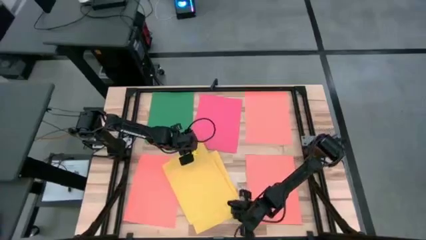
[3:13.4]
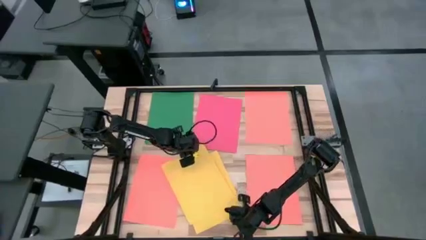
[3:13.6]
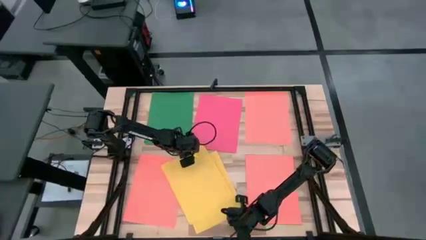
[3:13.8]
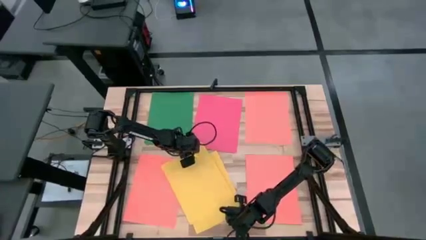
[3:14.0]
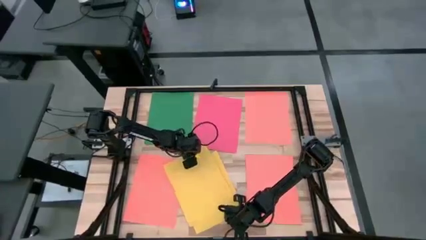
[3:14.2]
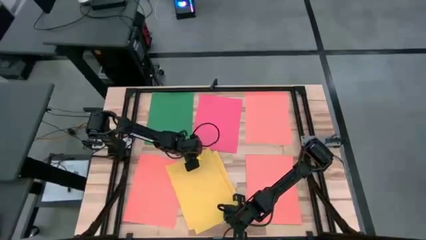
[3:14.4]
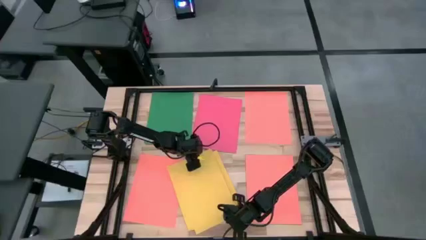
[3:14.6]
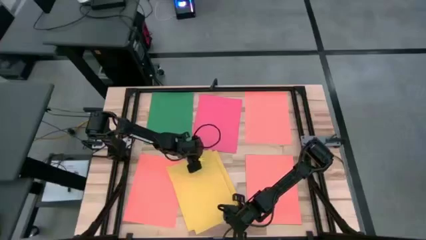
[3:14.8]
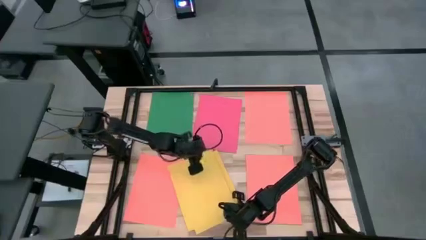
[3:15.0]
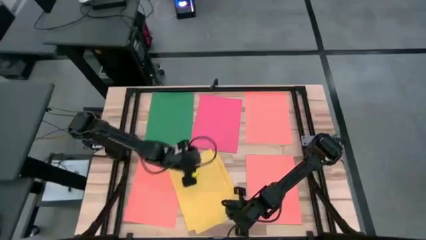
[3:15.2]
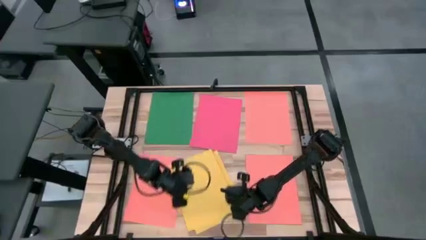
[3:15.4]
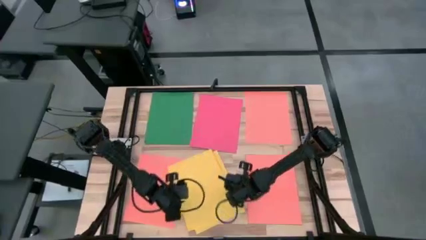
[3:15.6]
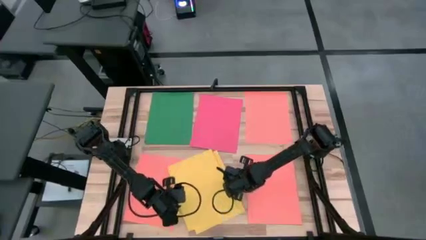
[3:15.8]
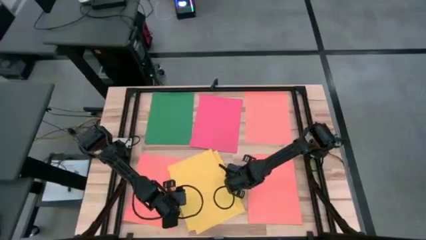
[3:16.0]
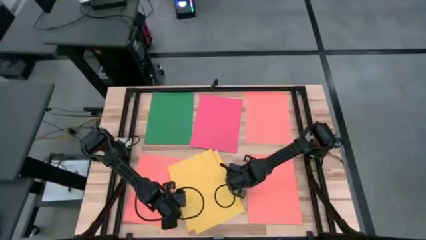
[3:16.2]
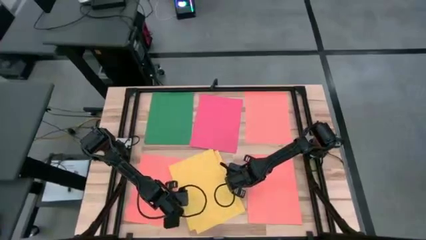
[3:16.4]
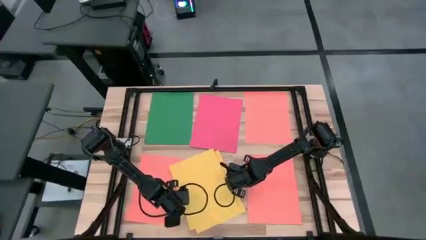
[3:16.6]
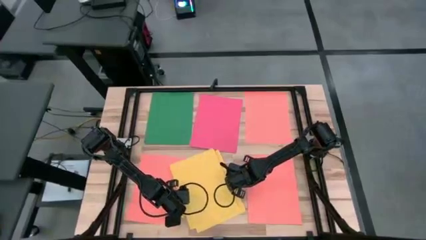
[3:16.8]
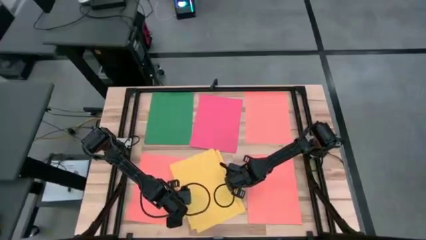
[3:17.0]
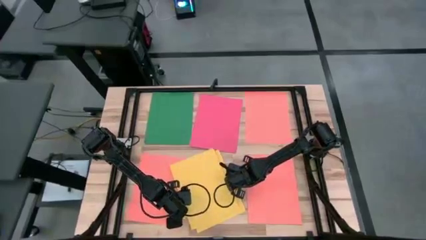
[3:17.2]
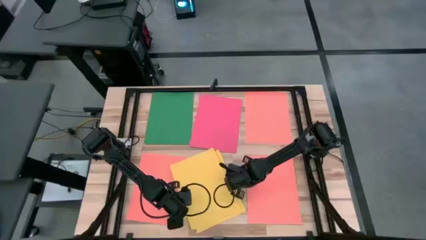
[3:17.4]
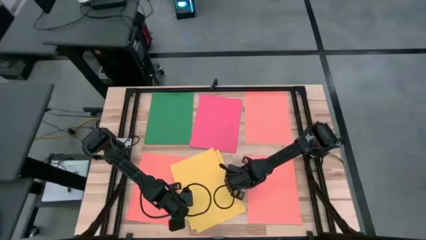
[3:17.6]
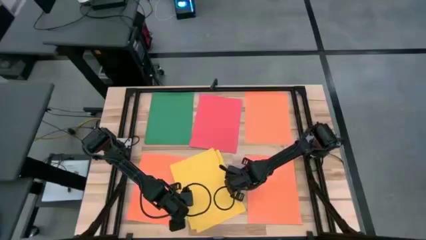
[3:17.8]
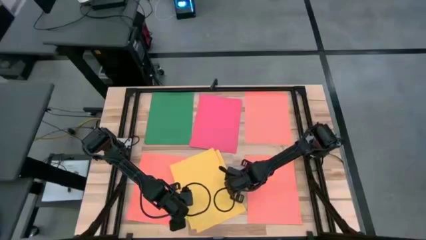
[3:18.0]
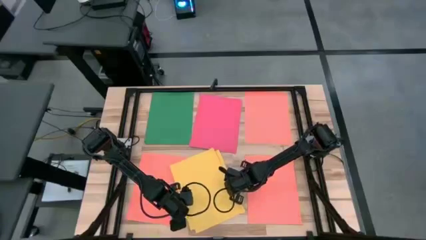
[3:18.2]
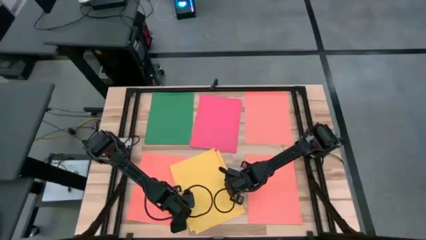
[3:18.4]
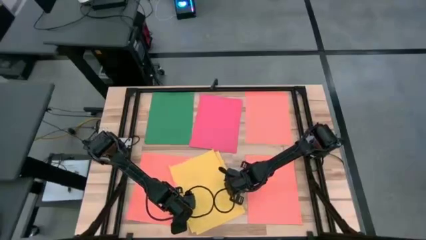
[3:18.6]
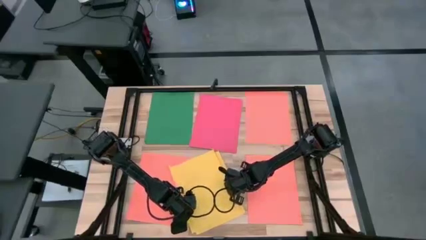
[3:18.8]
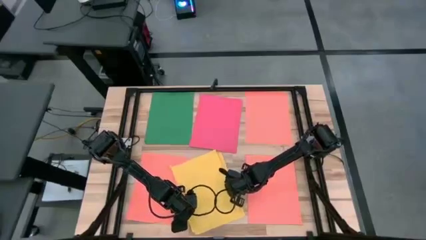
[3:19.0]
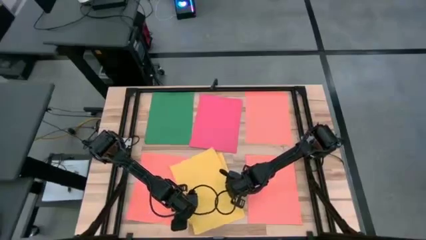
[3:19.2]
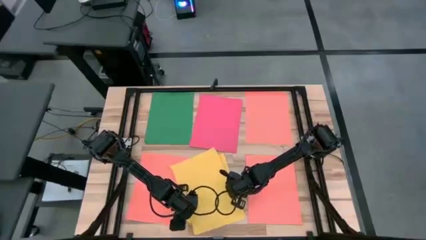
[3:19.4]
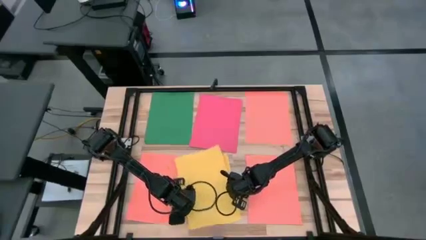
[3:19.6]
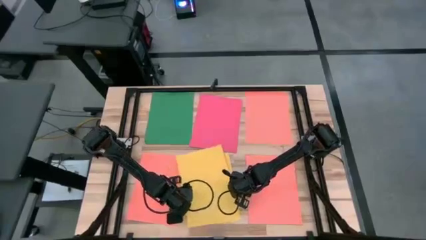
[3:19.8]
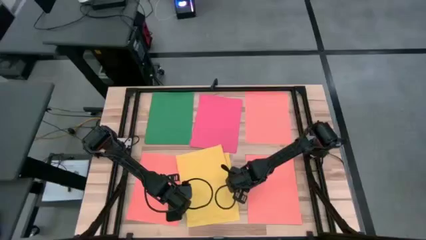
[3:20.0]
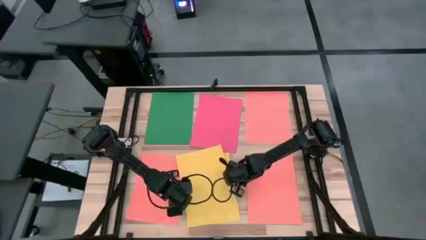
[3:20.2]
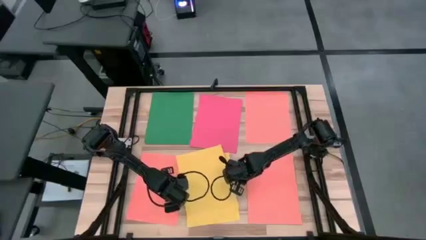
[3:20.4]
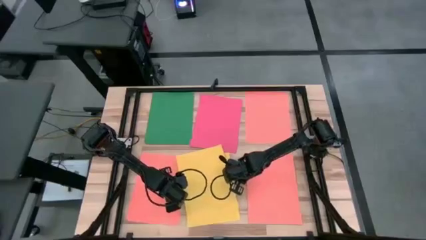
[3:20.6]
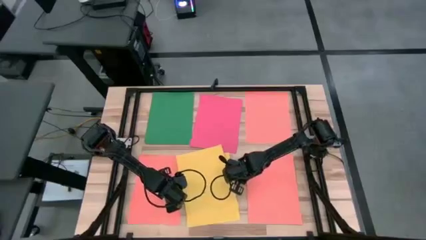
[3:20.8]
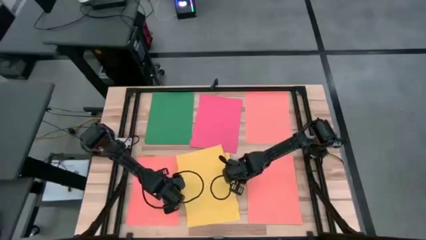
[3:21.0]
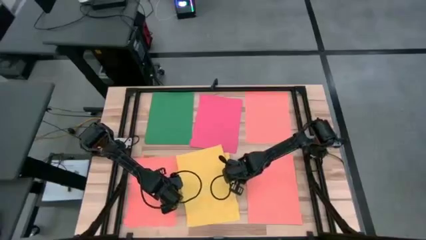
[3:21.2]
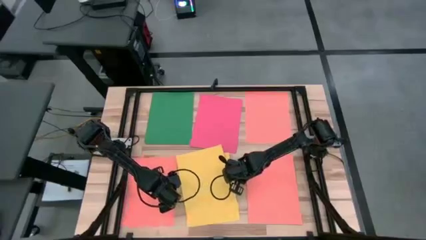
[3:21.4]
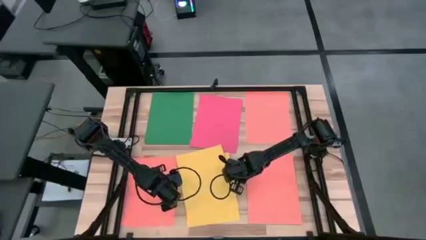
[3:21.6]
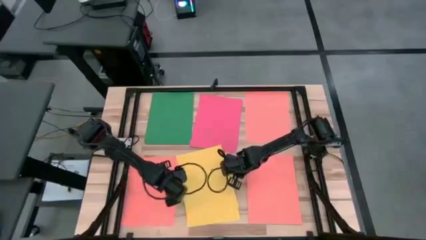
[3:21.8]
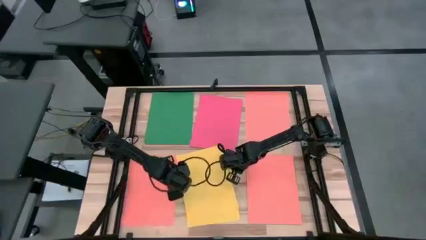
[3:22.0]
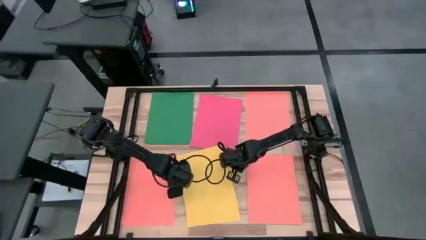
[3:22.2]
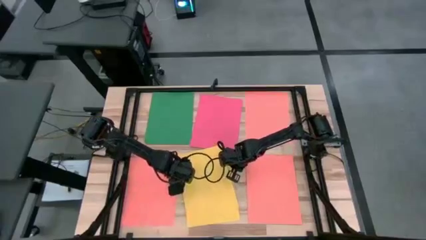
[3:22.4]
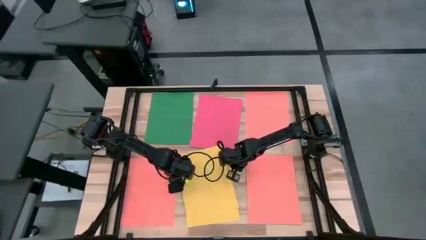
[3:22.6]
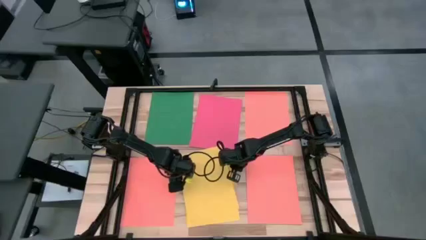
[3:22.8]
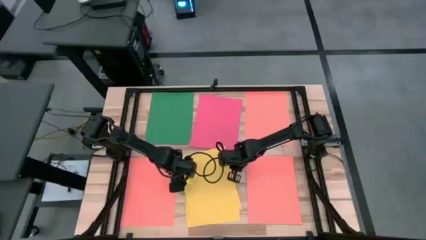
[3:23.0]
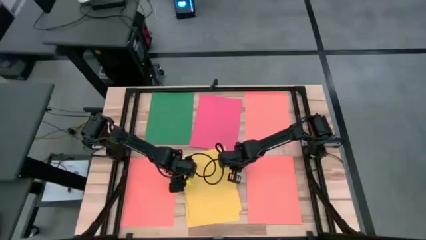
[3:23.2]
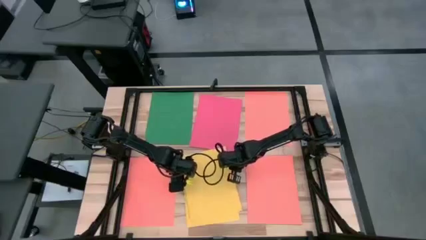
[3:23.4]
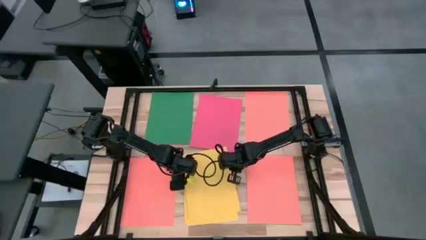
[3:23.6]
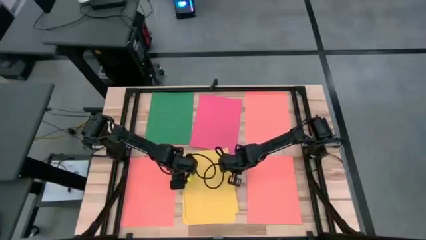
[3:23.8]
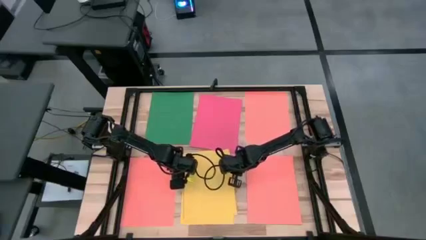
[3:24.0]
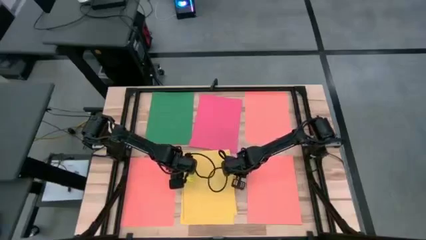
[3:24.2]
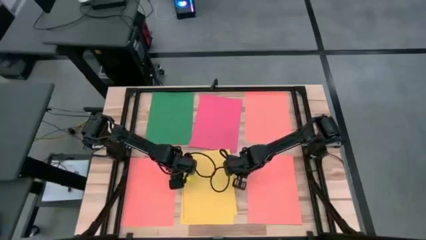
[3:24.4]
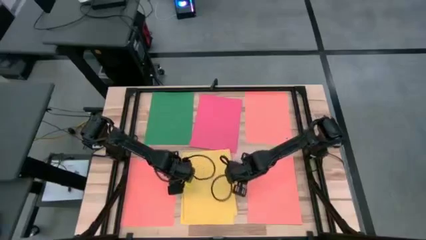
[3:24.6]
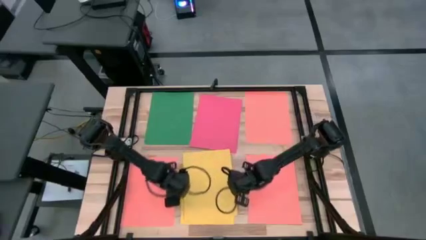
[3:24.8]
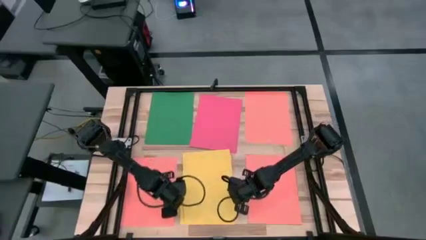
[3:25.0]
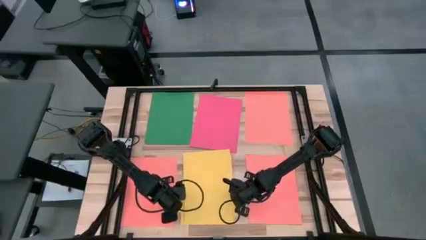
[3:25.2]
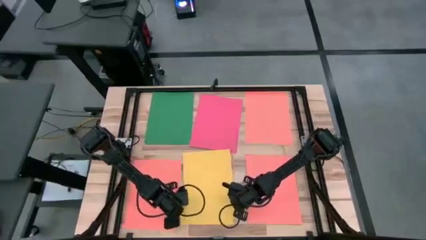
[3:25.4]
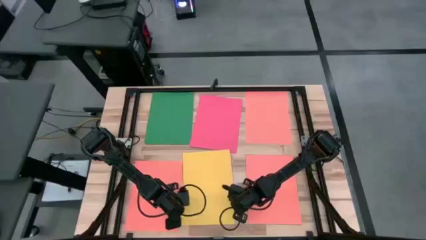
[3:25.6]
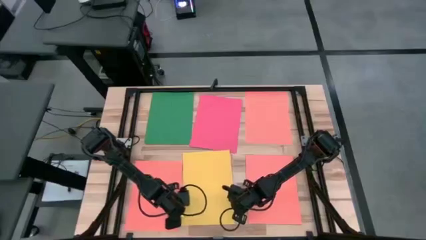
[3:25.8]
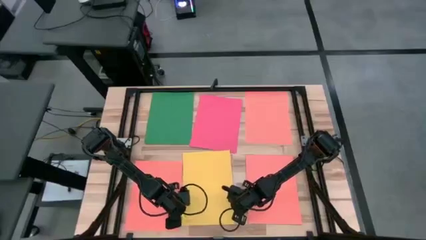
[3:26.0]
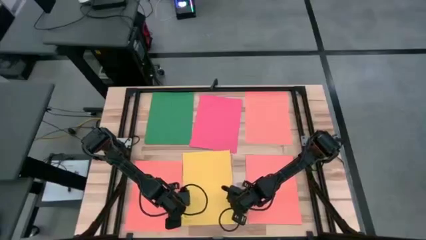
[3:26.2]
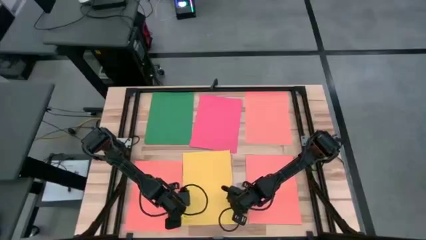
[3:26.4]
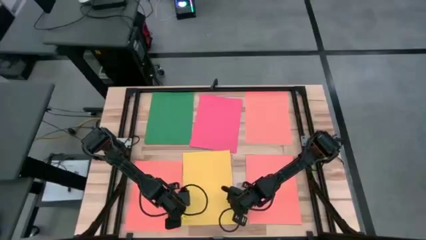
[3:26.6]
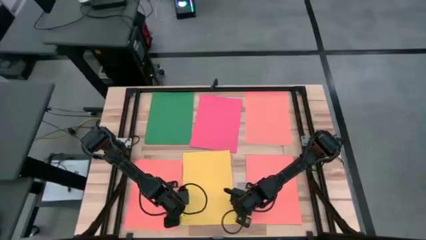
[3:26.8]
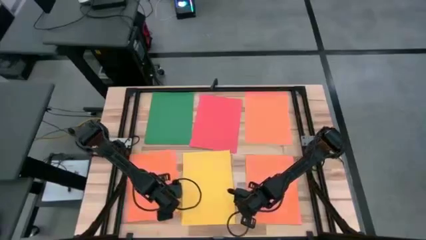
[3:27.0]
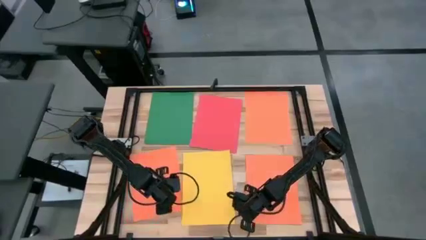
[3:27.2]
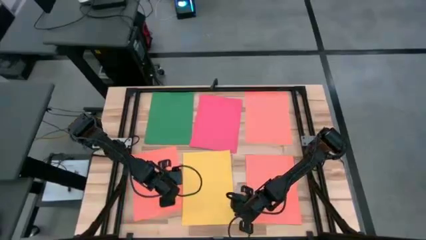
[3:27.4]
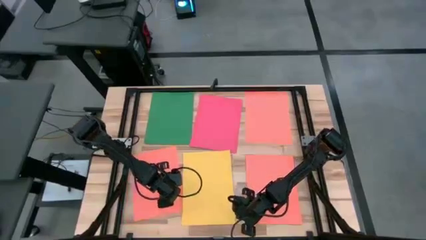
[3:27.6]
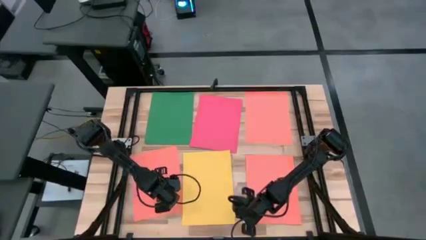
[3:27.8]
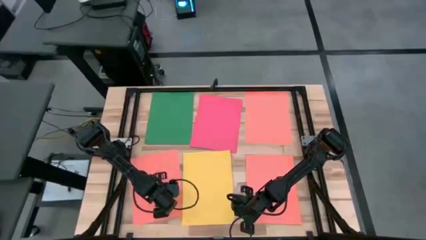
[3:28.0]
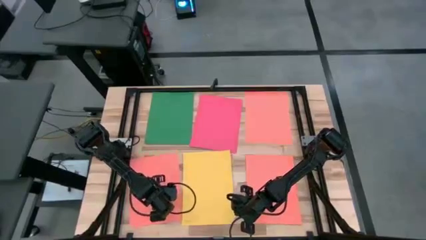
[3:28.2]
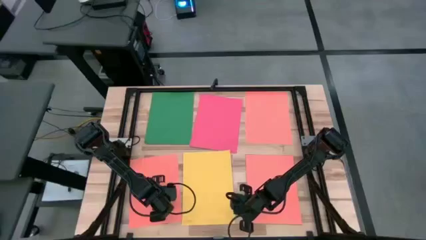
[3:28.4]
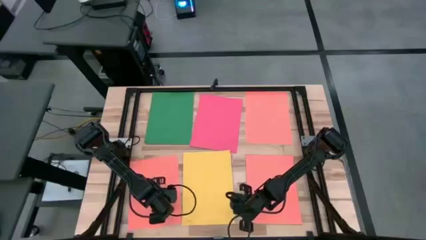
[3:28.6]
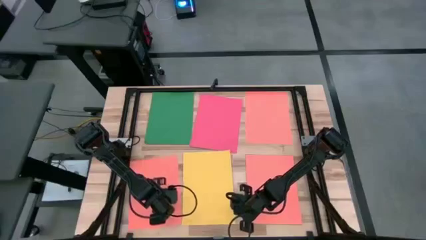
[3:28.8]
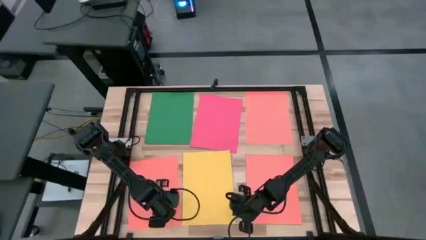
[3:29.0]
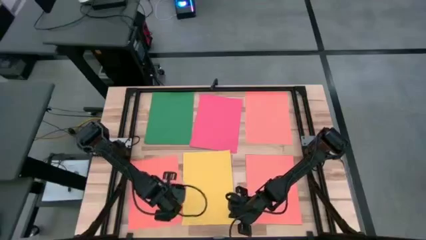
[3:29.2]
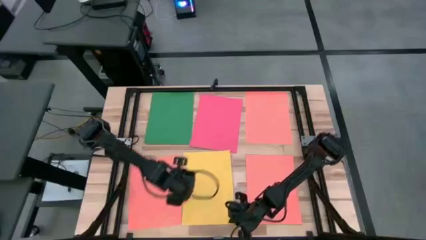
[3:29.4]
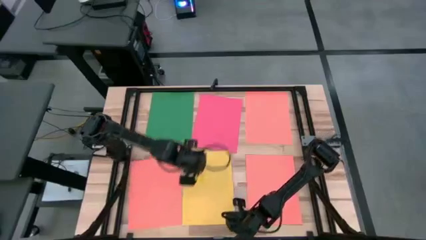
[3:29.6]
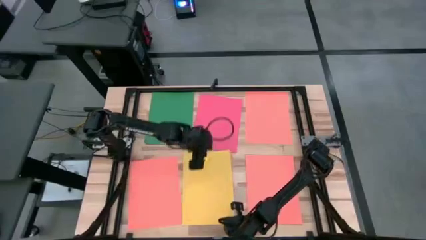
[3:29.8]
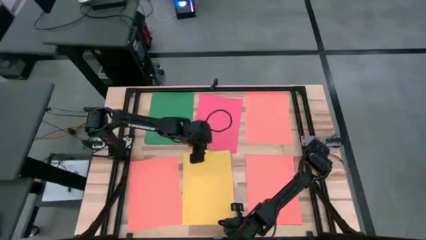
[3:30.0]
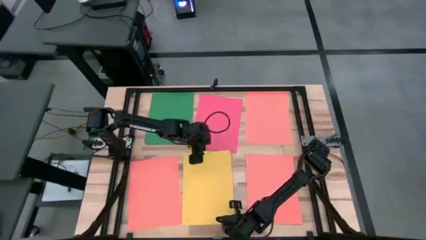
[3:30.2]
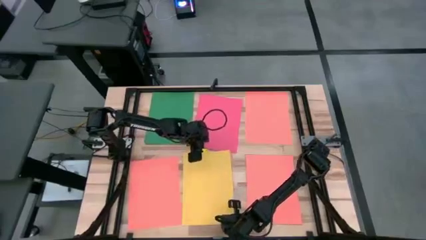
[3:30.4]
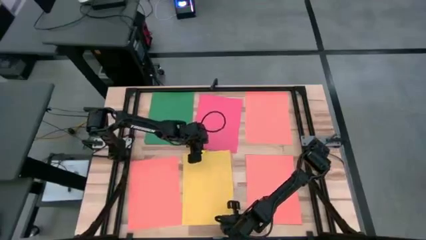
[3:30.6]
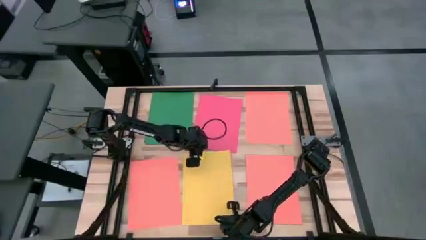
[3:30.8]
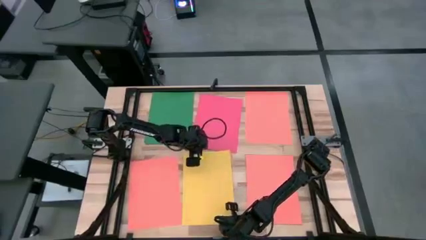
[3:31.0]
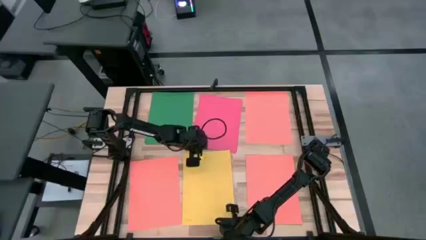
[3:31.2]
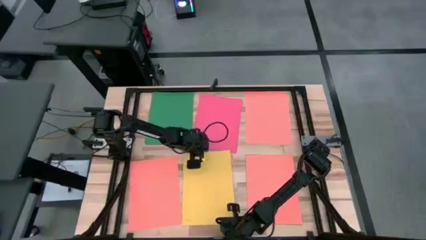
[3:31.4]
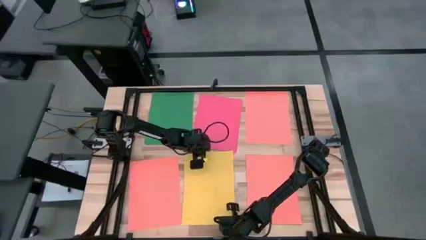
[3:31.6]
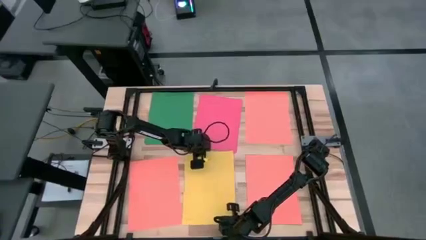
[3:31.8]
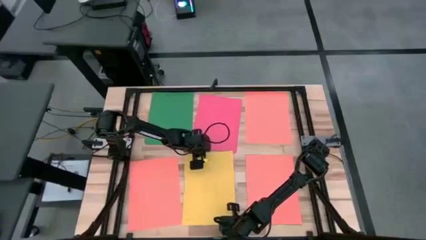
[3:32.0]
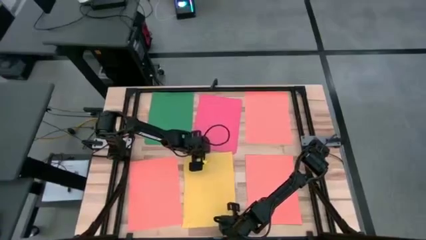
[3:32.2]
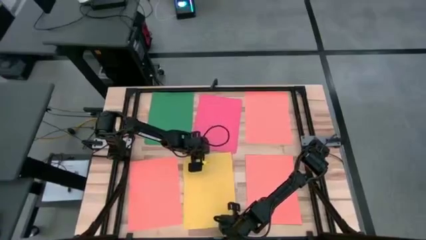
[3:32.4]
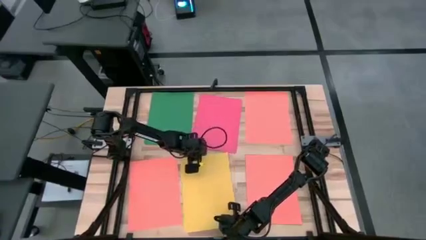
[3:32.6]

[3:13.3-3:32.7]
Task: Organize paper
Stack the yellow paper on top of the yellow paper
